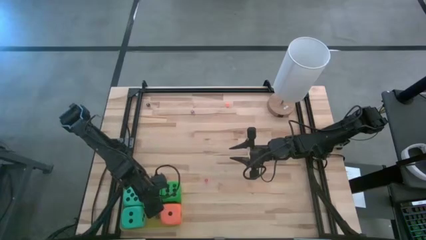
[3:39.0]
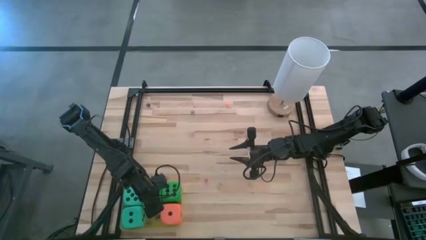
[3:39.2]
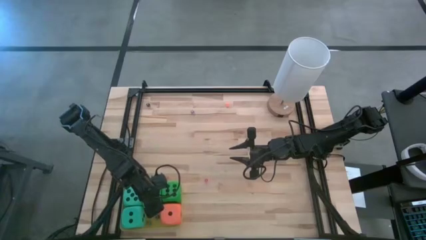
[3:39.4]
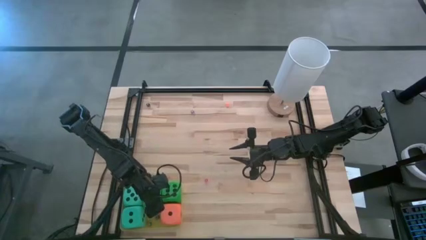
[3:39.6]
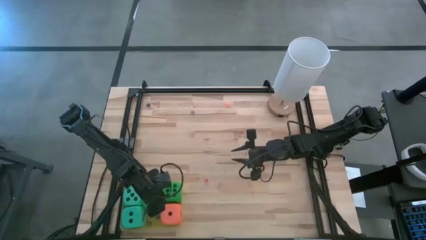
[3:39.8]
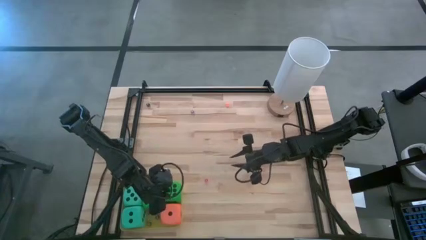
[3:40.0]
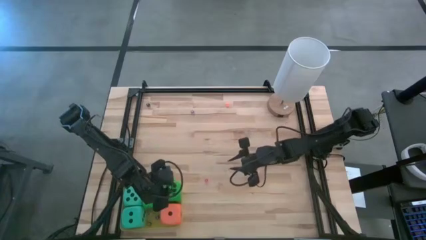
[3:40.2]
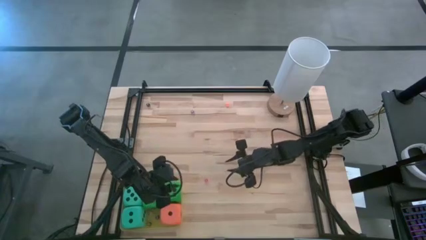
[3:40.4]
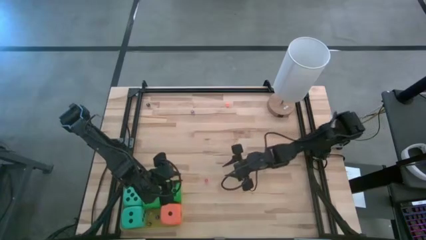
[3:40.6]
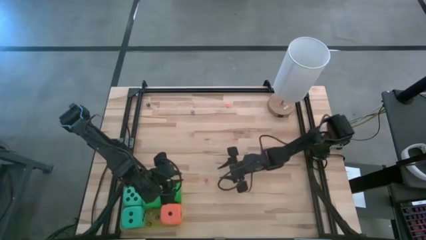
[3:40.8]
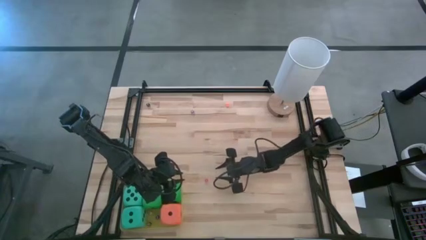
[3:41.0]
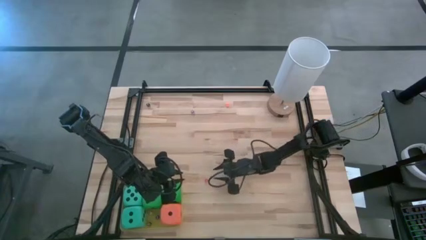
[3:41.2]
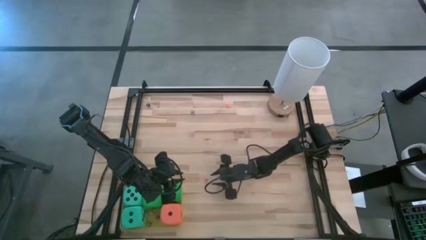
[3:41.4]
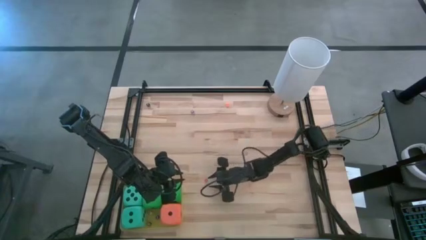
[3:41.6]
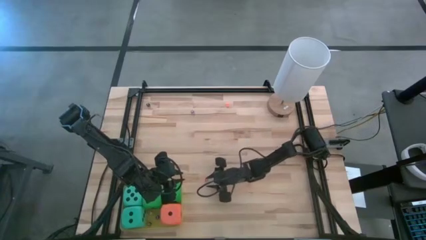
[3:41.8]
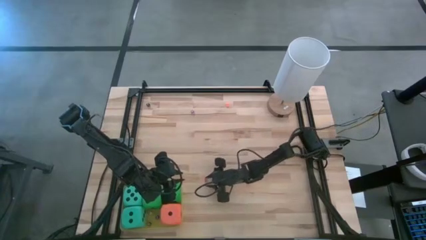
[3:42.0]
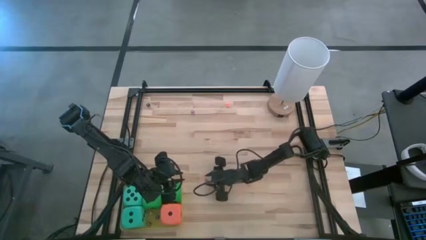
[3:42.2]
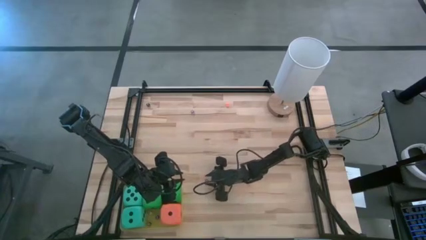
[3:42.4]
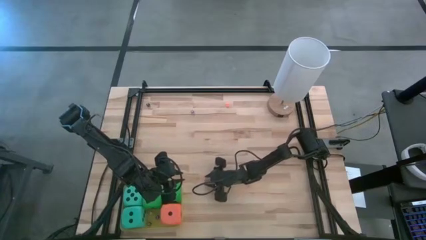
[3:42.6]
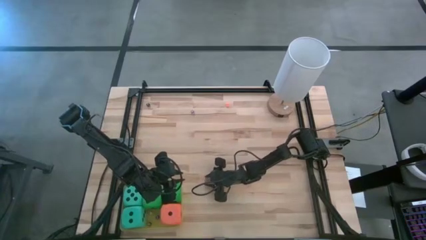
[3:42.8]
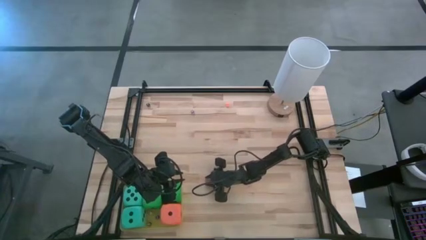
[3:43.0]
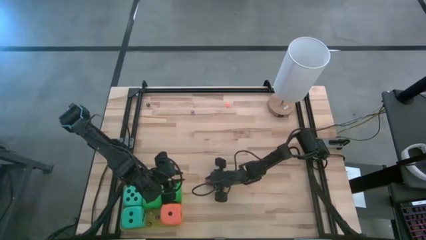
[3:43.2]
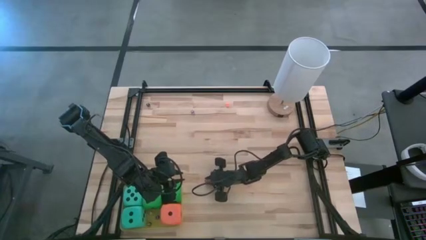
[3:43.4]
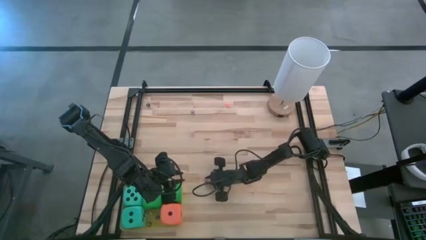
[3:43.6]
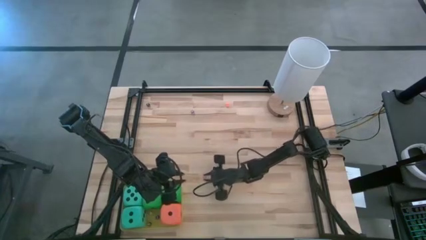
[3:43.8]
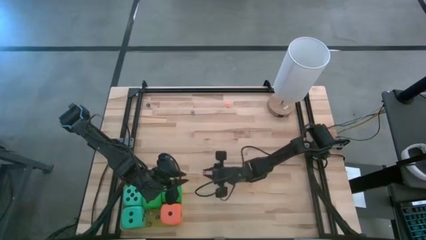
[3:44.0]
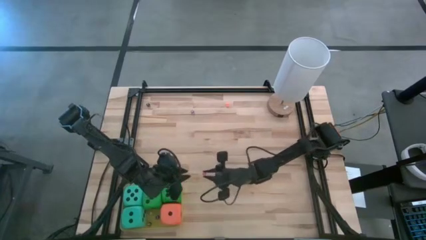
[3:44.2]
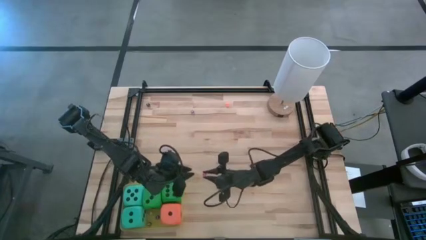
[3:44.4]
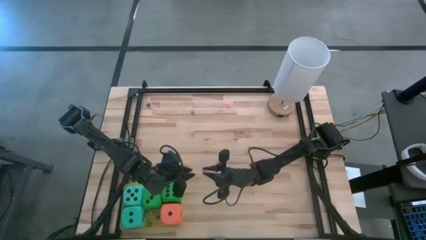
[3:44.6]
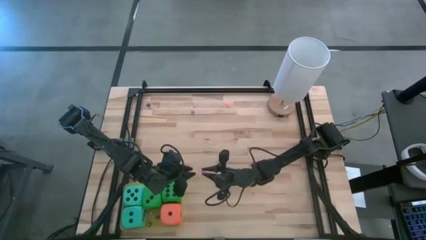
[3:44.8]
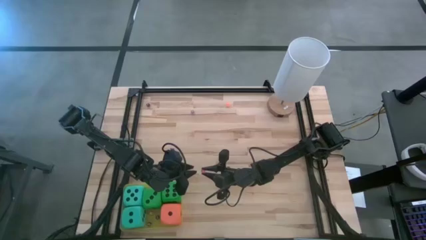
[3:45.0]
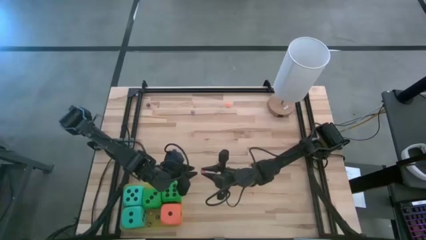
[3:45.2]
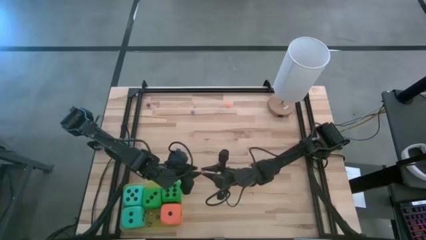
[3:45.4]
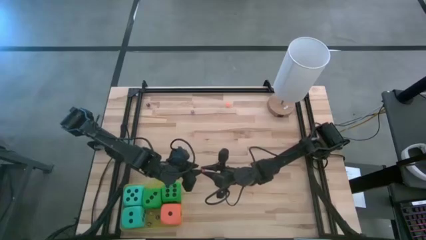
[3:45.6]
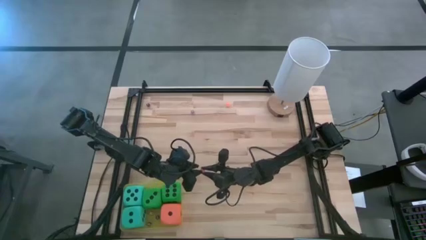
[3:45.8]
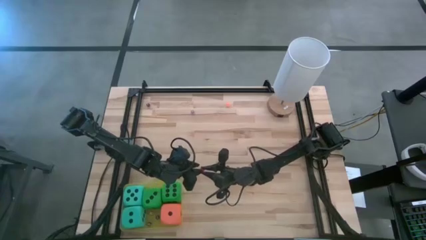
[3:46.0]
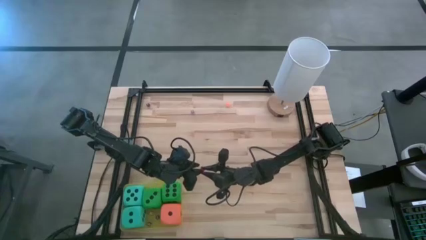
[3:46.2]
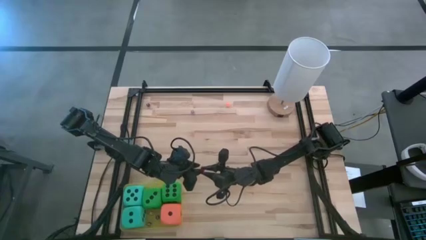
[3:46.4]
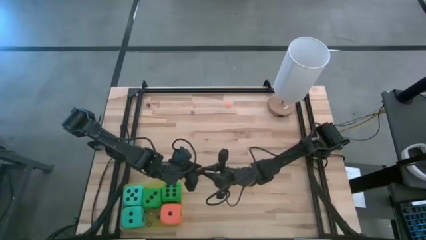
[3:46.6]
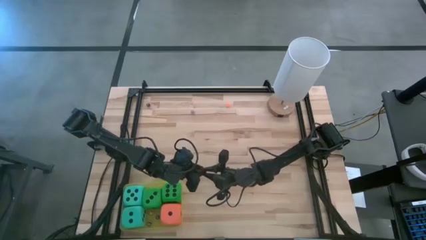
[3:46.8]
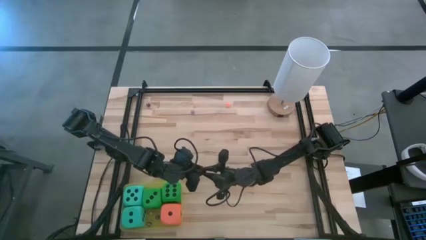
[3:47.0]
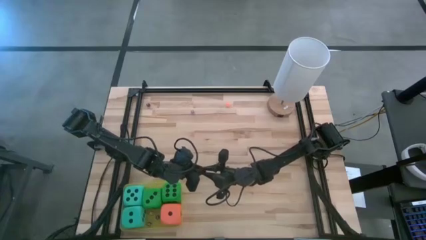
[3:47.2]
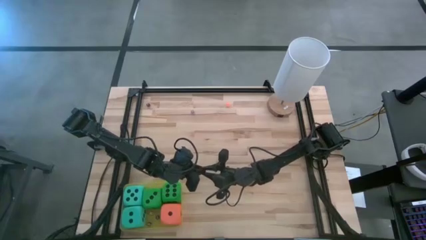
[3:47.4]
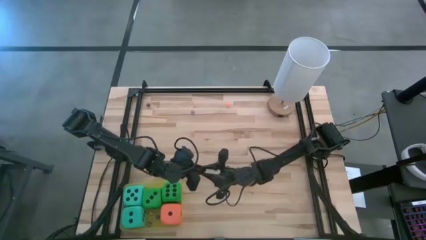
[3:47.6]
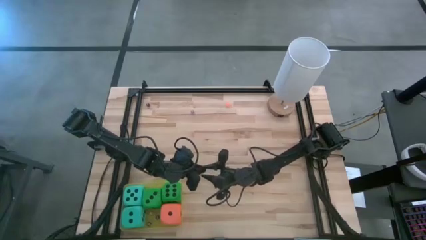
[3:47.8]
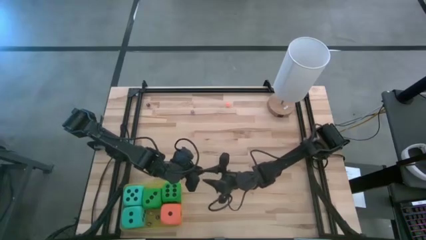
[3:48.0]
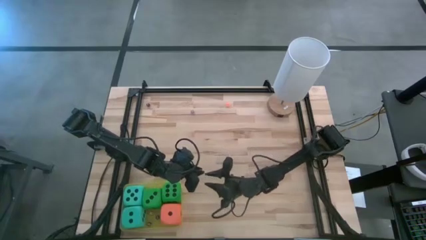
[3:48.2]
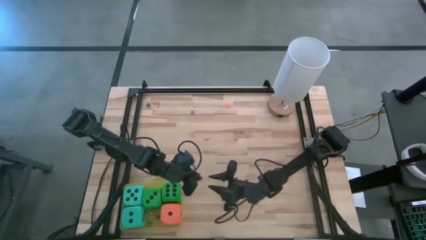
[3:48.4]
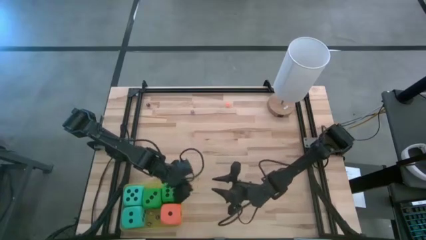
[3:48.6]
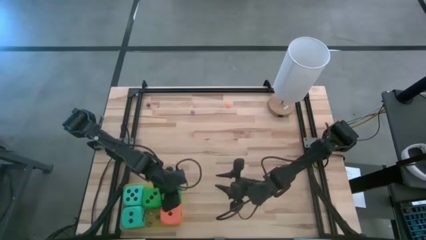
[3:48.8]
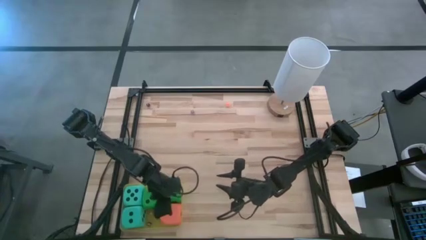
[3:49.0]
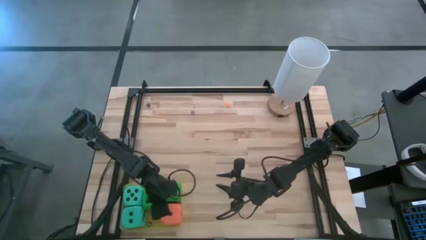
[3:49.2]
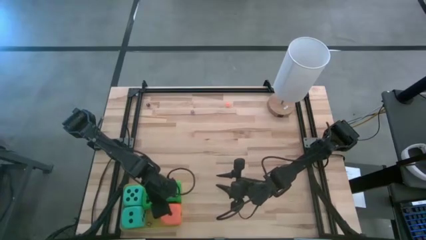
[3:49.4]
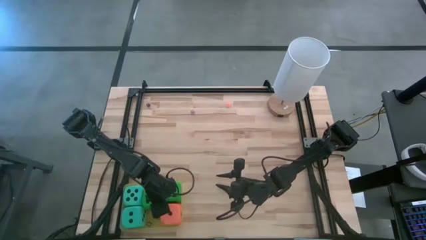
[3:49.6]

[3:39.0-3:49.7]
Task: Pick & Place Dice
Put the pink dice into the yellow bin

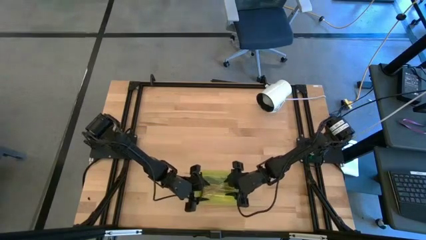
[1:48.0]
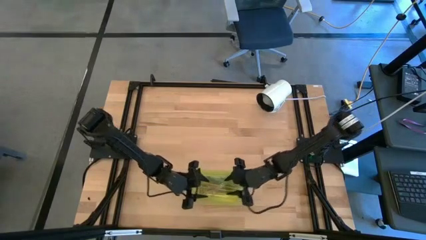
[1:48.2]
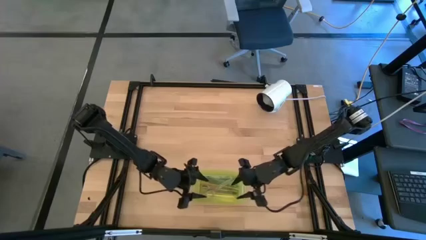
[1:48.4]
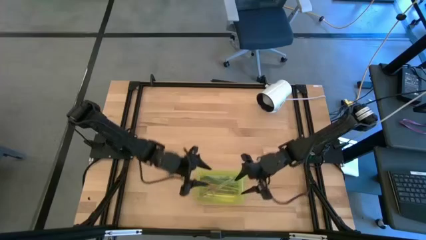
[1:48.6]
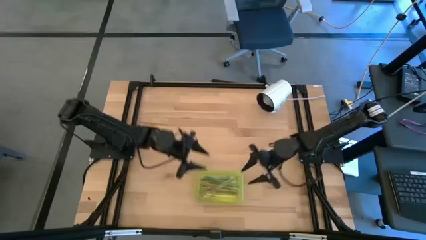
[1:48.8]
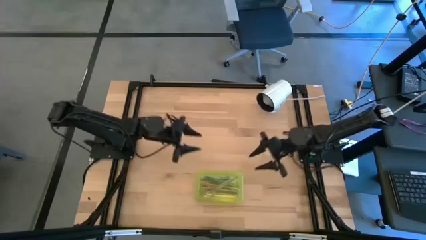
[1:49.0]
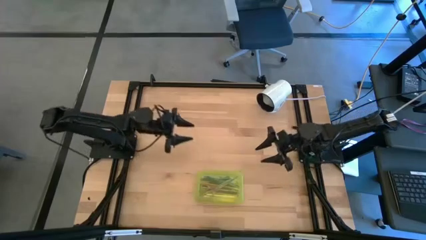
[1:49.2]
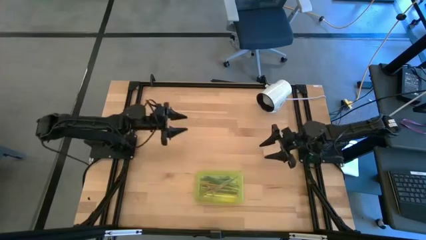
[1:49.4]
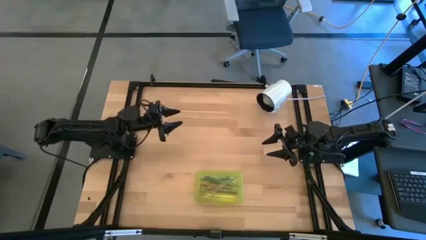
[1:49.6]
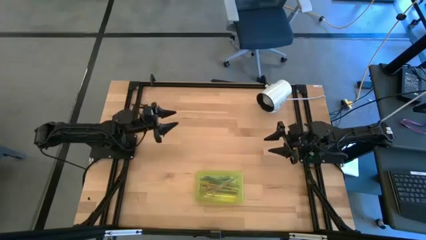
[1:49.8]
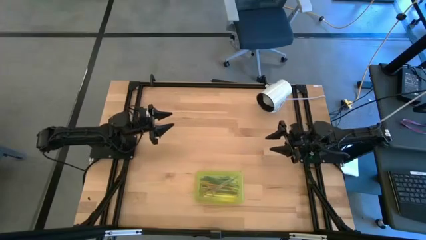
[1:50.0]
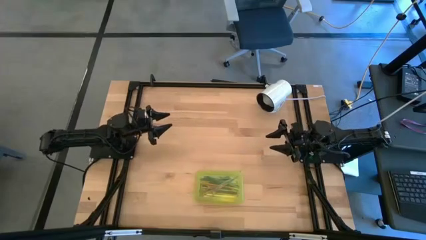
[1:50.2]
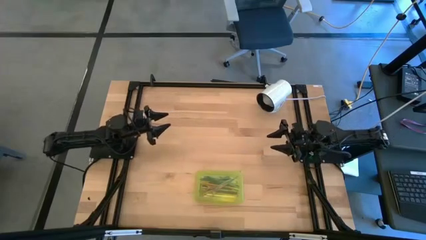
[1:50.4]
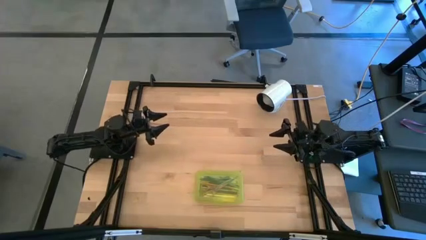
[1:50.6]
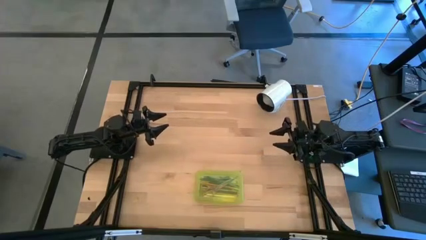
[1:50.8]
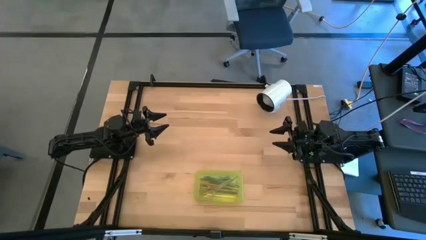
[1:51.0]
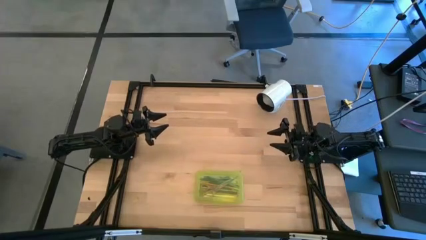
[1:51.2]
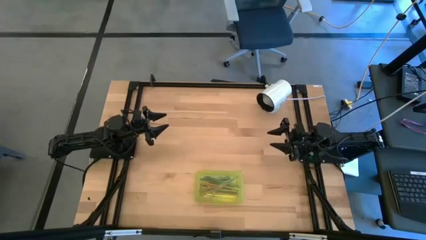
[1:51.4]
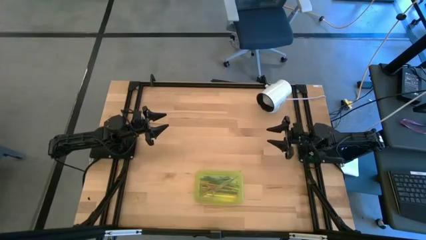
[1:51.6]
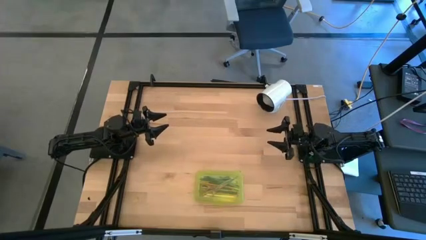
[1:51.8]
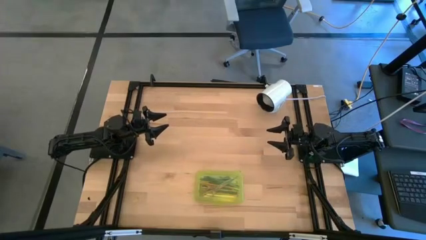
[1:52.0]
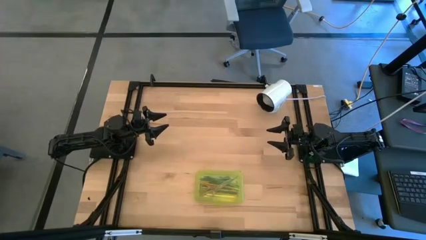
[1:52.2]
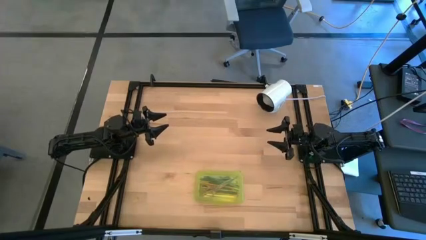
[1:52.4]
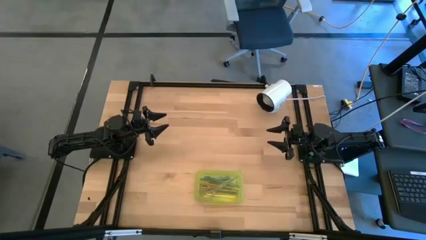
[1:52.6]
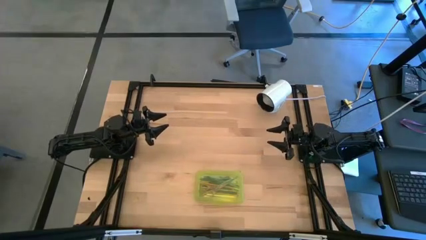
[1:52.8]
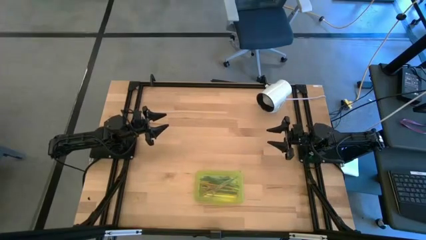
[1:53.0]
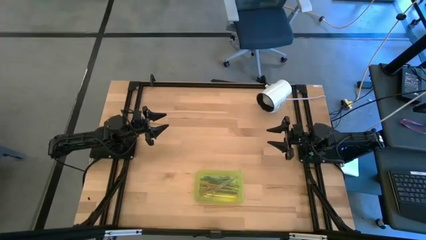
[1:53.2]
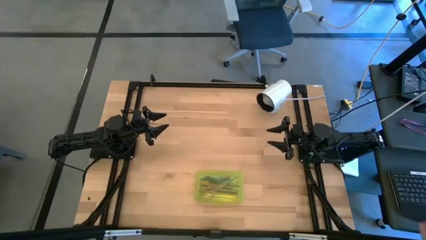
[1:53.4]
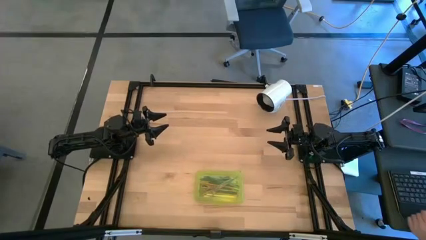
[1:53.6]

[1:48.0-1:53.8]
Task: Pick & place school supplies into a supply box
Return to Home Position
